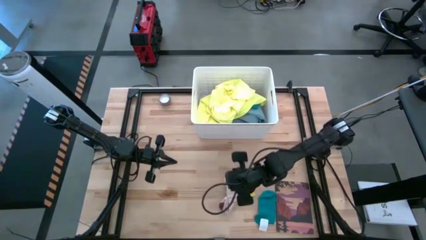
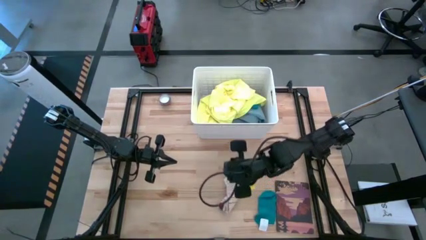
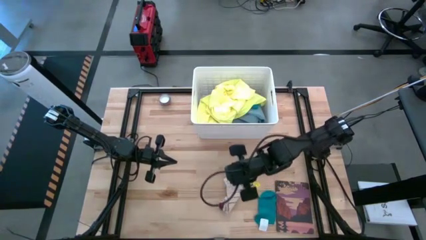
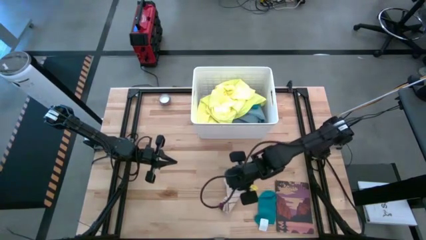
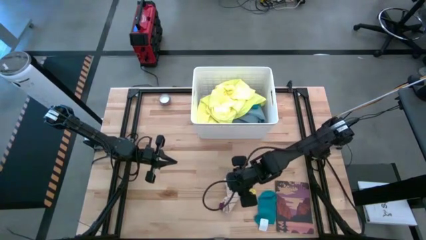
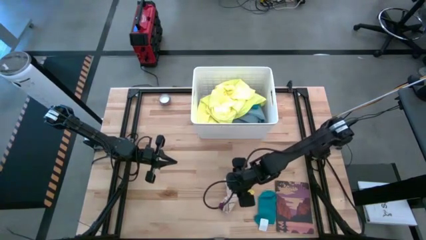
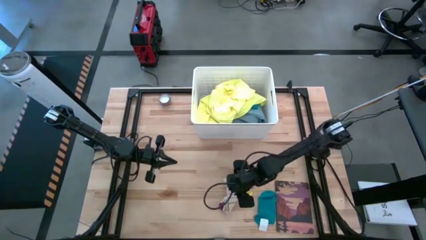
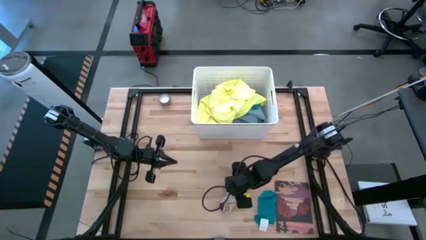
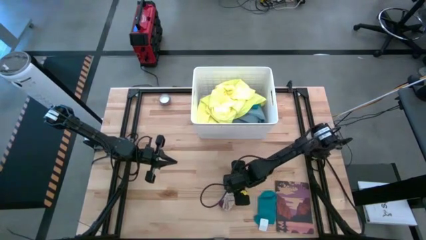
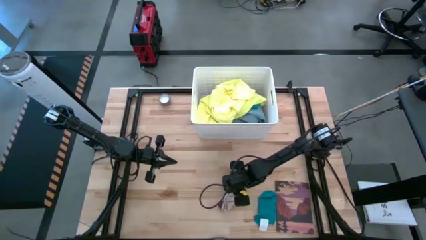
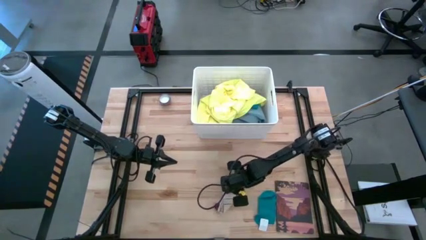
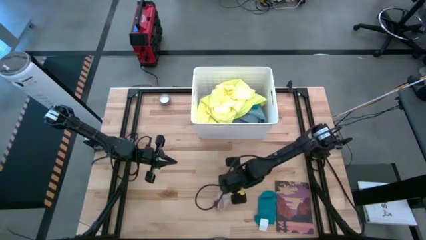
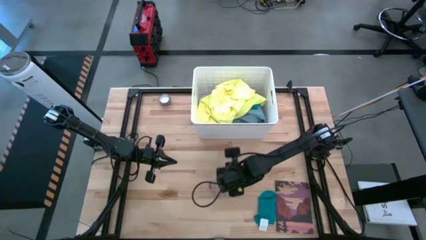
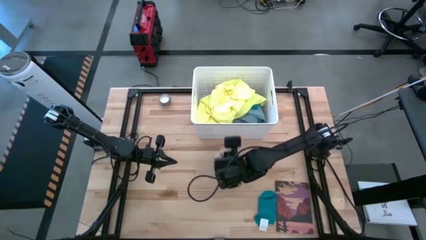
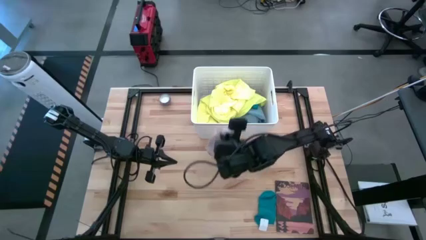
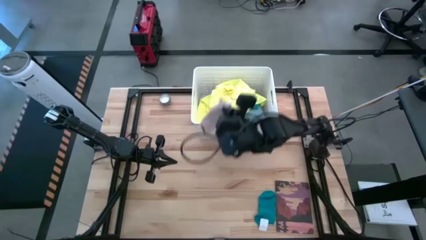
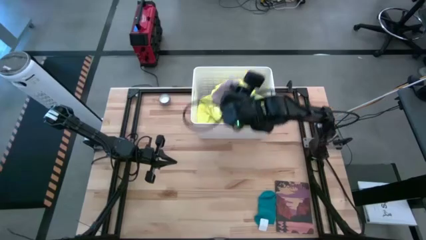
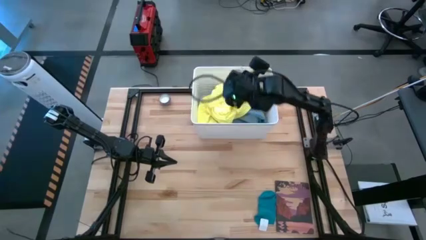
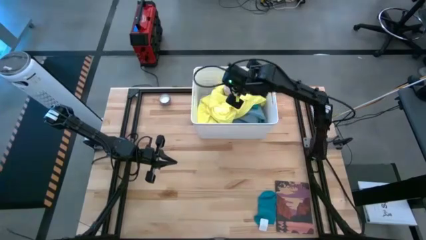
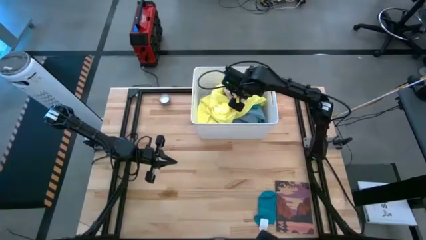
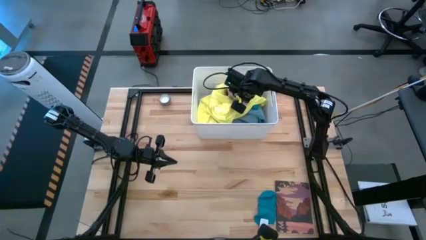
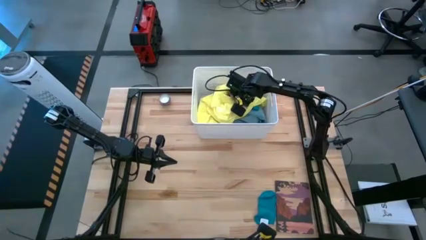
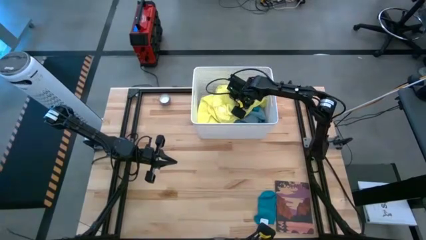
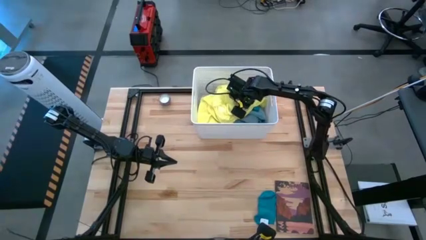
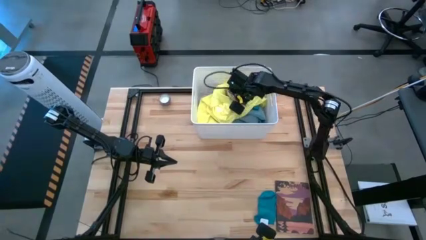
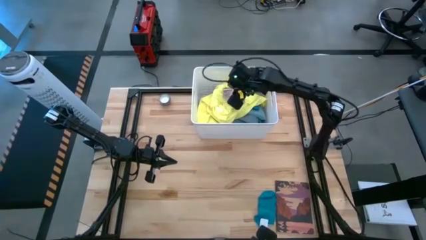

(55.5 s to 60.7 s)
Task: Sort clothes
Put the red striped sock into the white bin

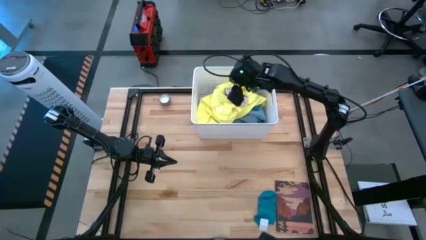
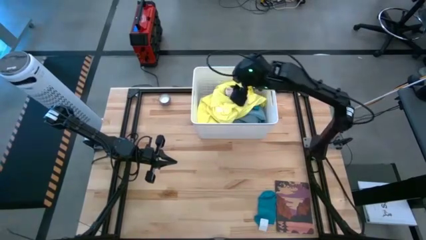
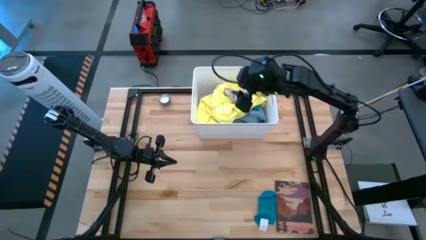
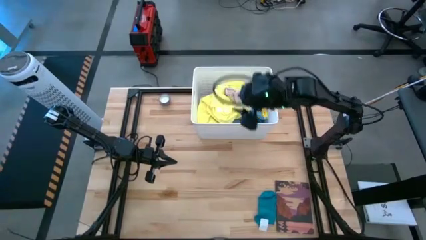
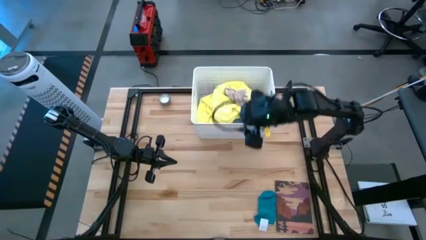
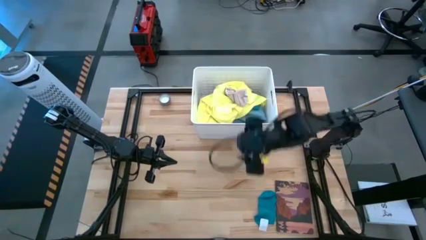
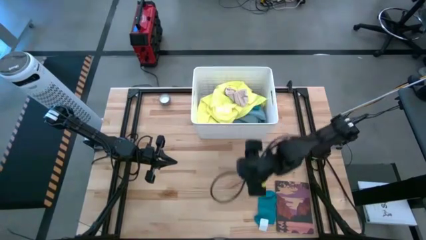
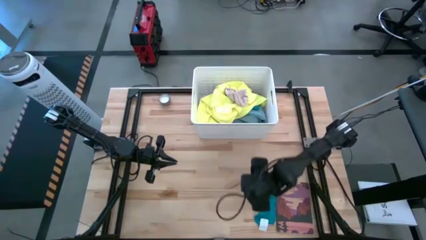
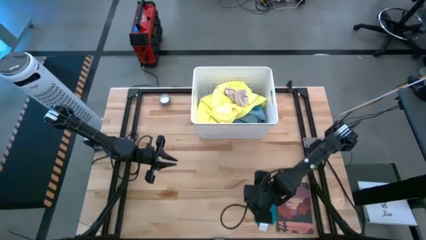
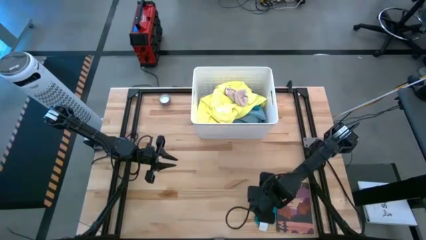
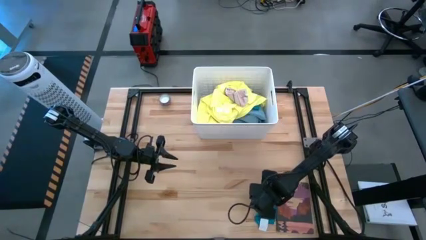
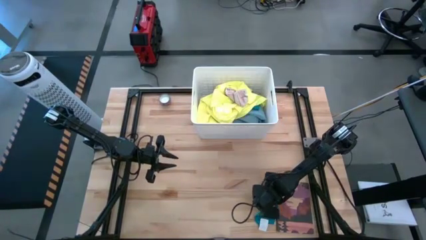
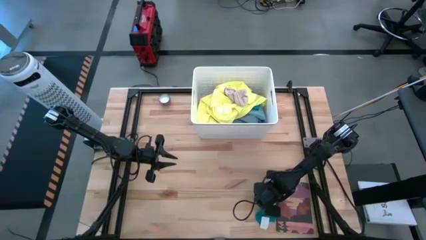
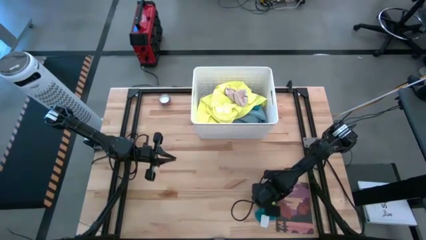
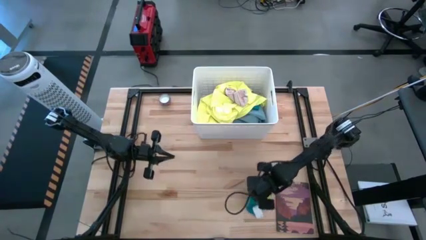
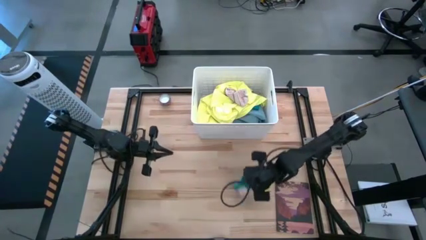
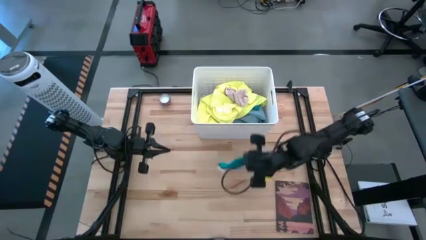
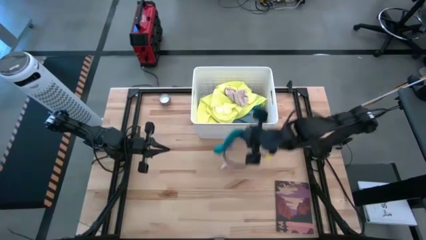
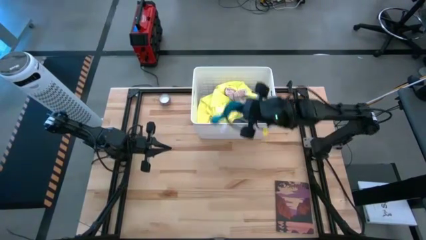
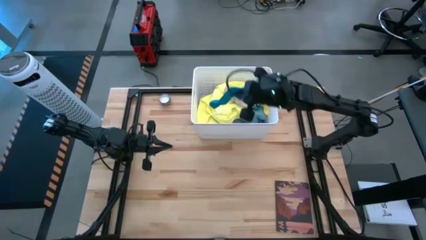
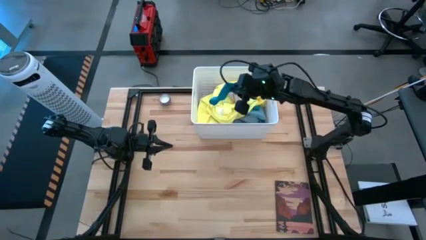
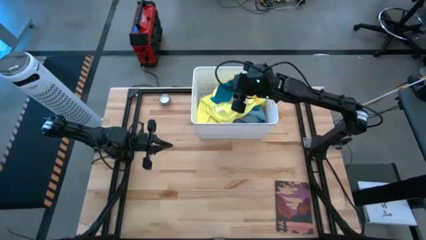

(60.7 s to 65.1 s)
Put the blue sock into the white bin

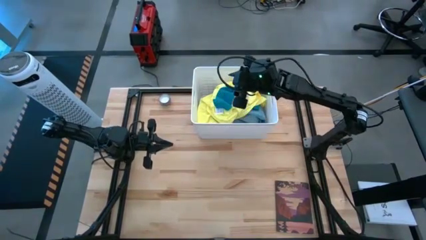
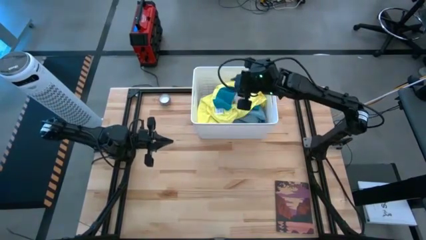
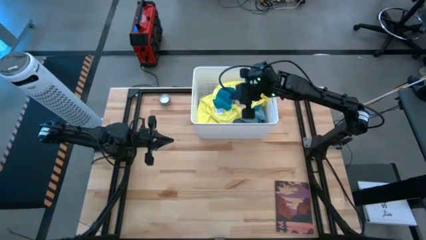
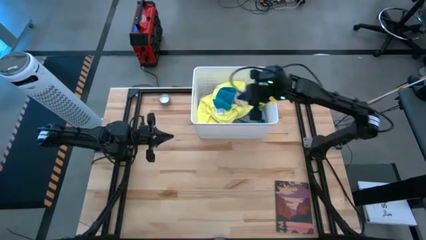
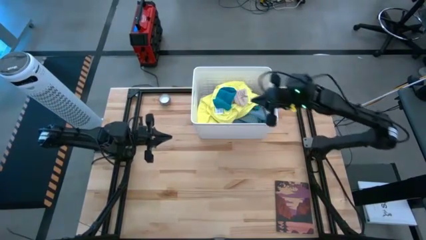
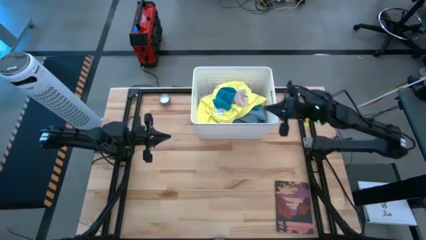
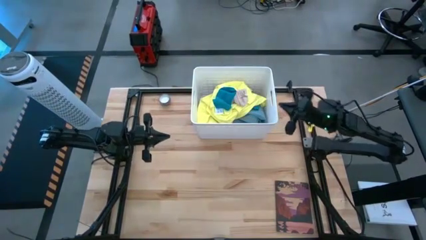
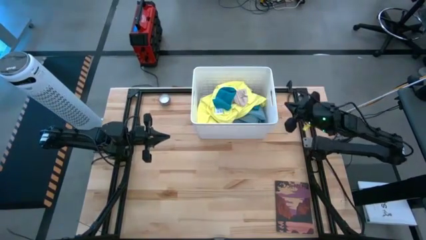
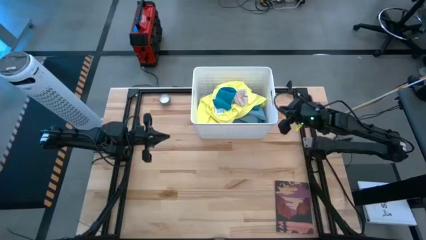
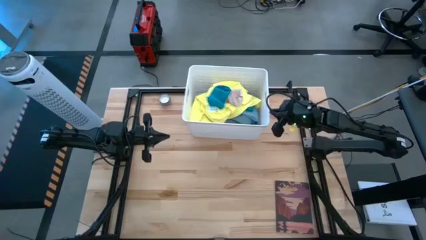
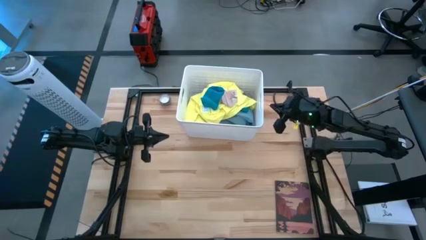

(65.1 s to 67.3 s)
Adjust the white bin on the table

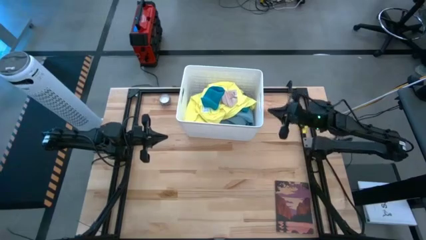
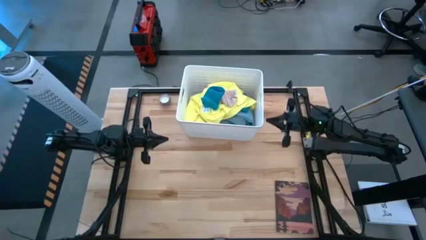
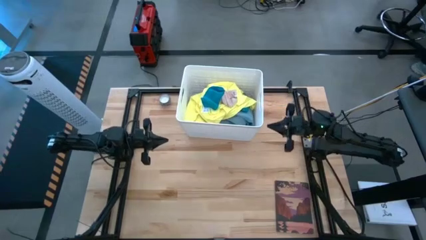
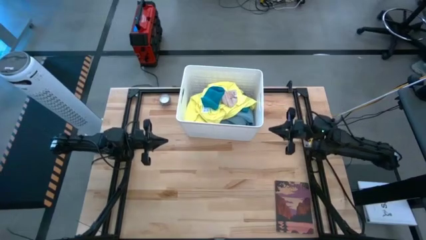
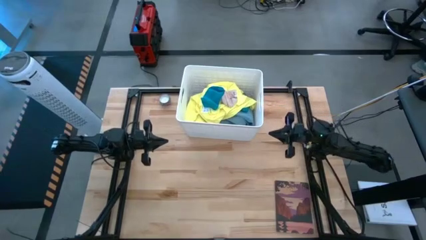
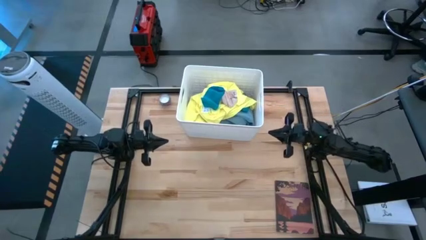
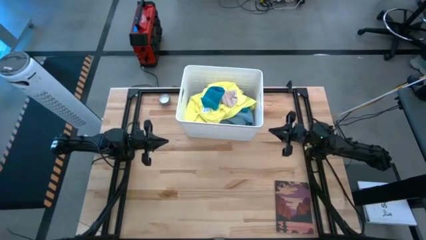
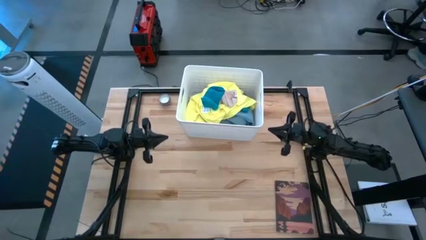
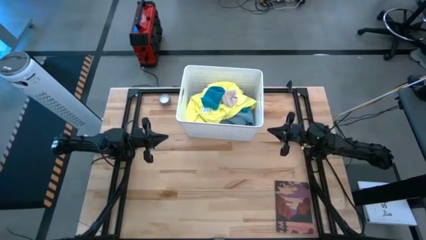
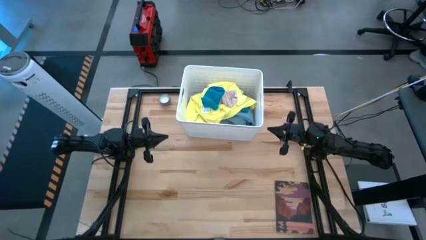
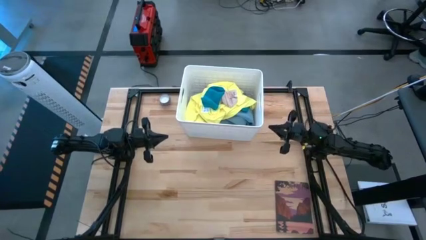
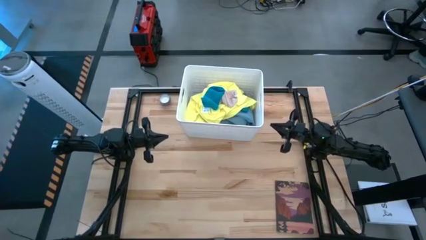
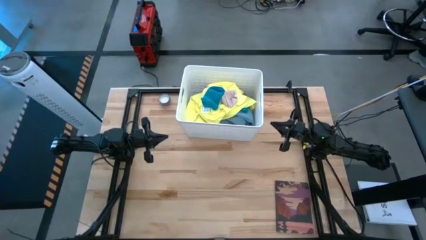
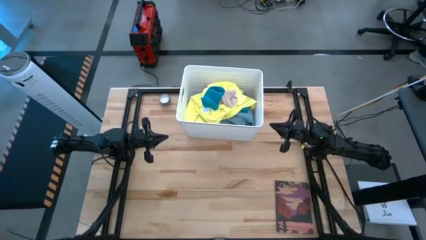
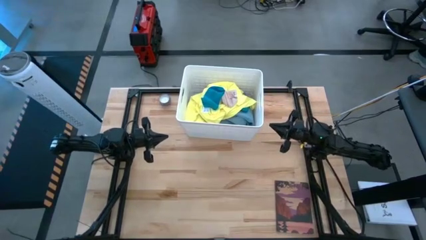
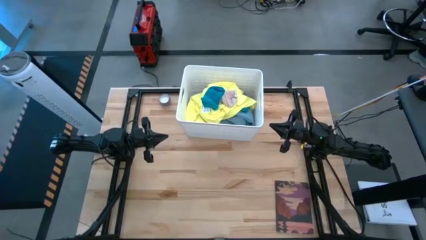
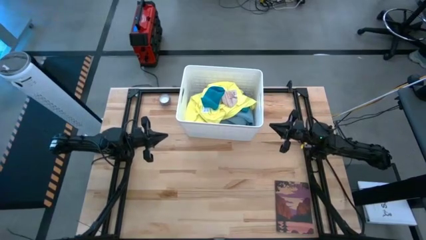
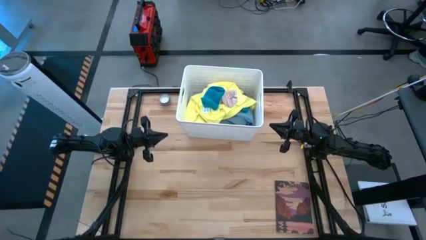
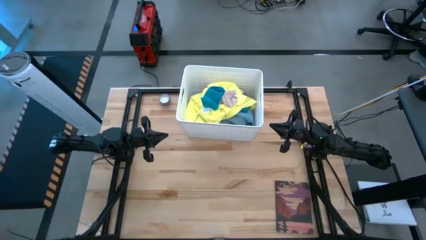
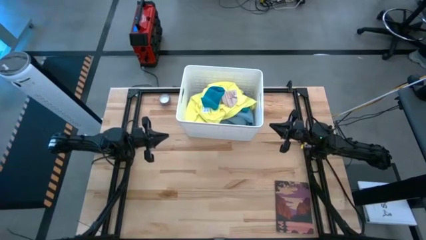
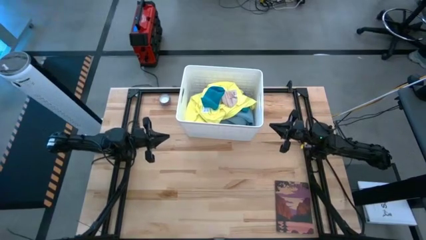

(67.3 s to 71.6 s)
Return to Home Position
